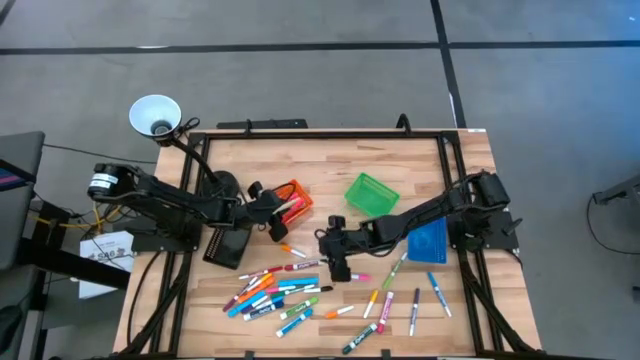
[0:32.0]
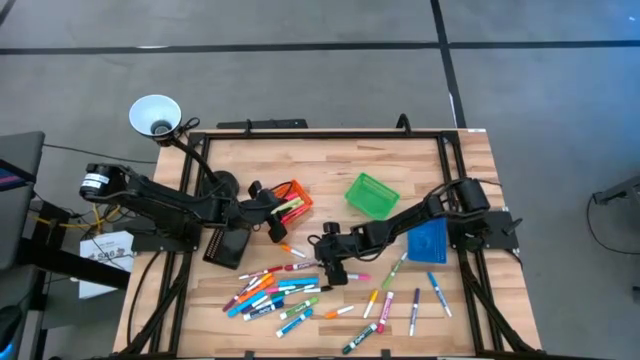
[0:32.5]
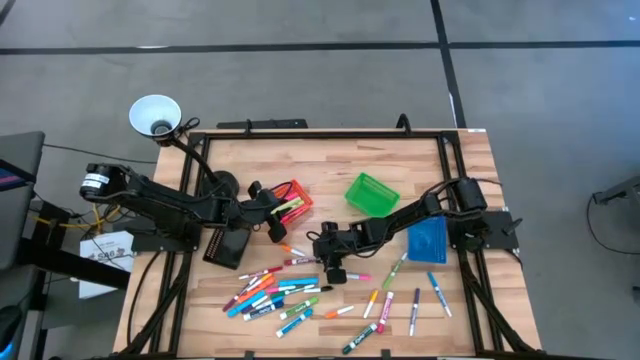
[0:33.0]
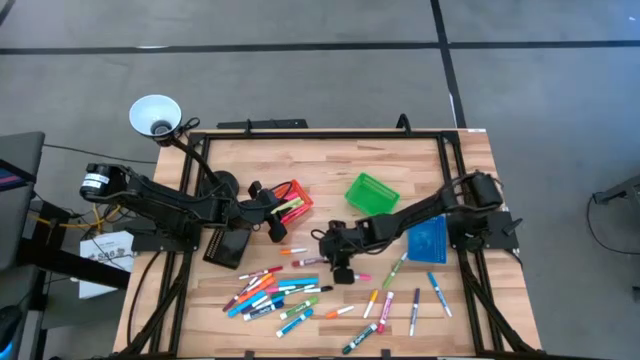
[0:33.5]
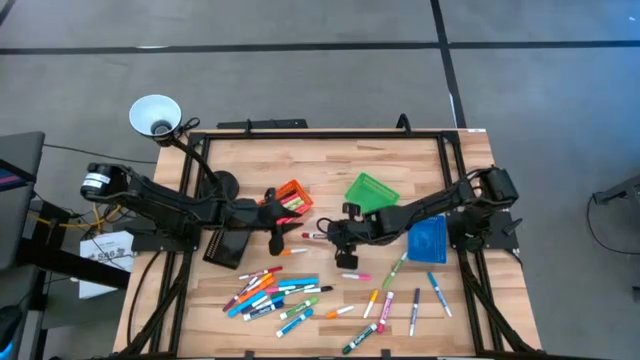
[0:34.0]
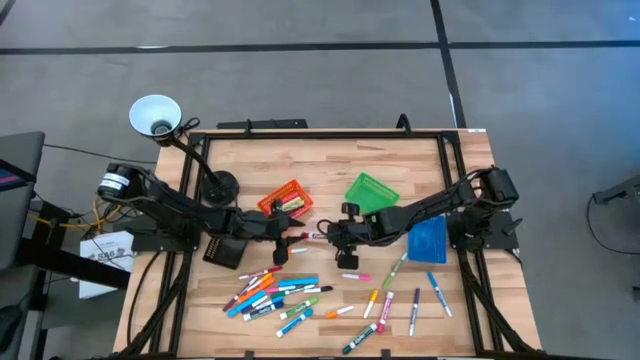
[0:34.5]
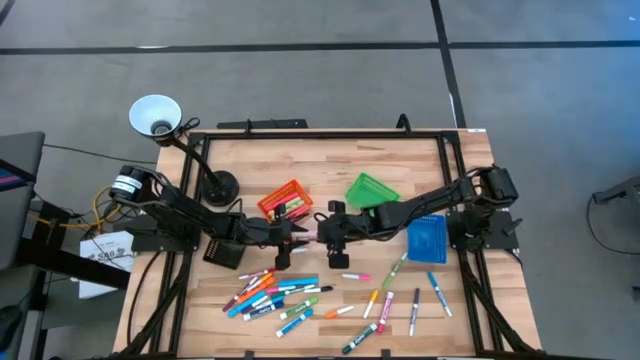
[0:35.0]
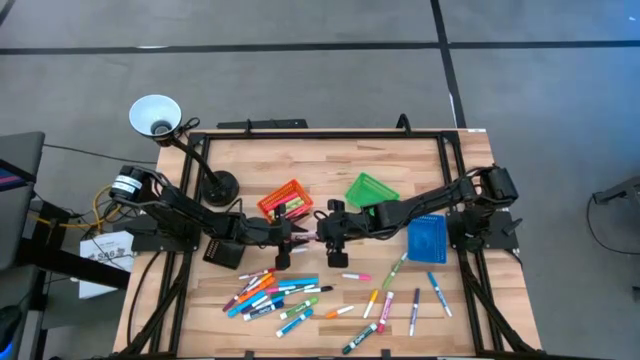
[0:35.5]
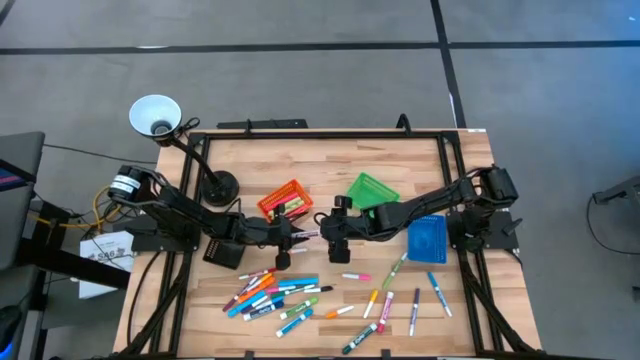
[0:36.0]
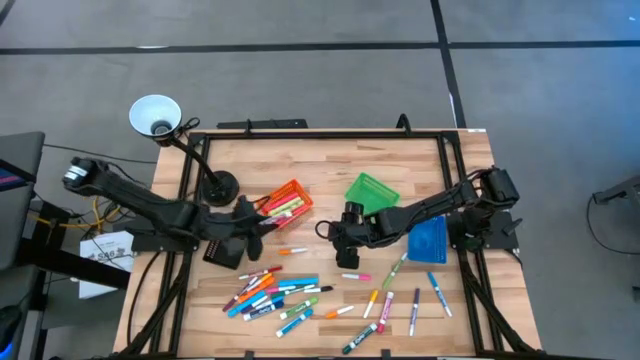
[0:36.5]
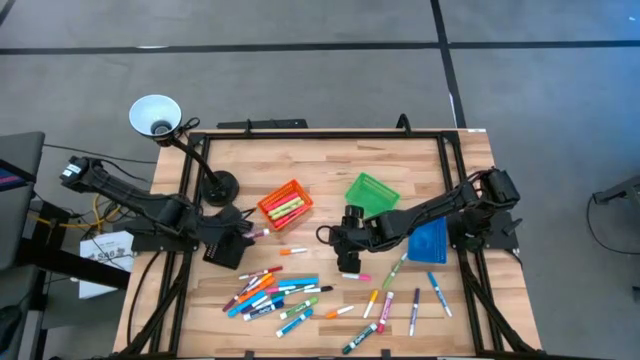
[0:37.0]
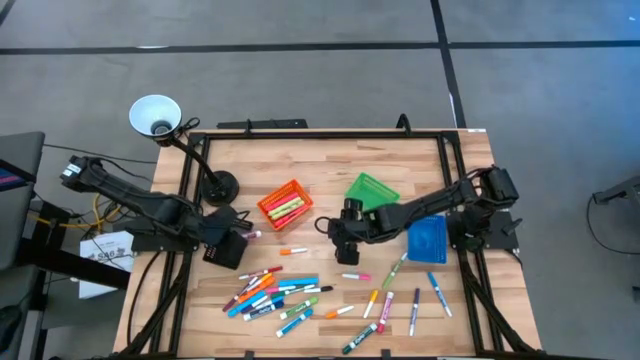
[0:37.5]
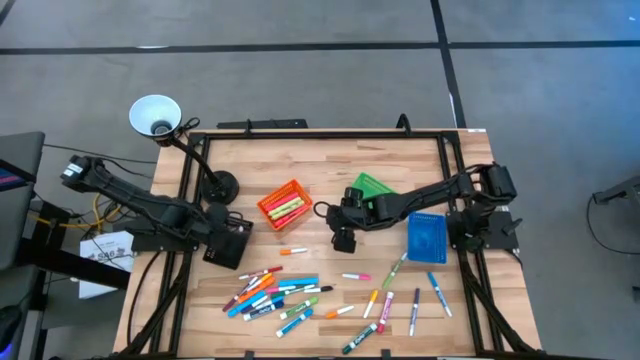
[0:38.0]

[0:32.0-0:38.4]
Task: Pick & Place Markers
Put the red marker pen into the black bin

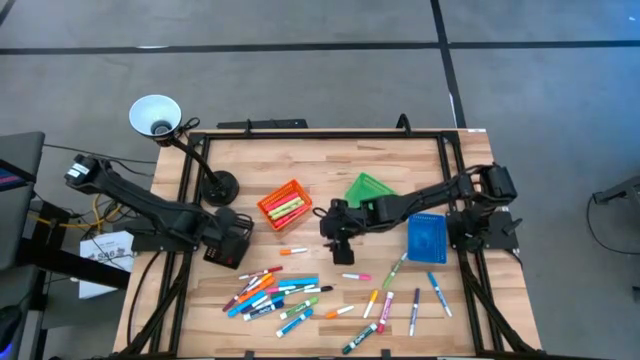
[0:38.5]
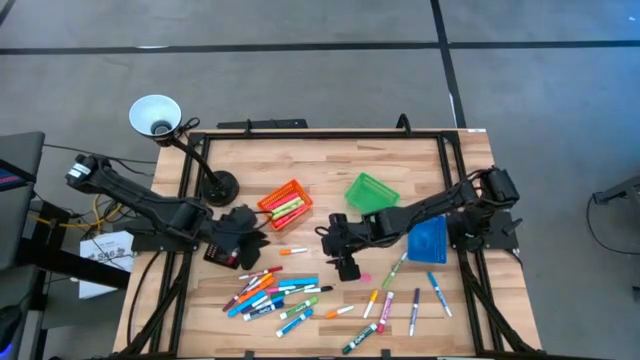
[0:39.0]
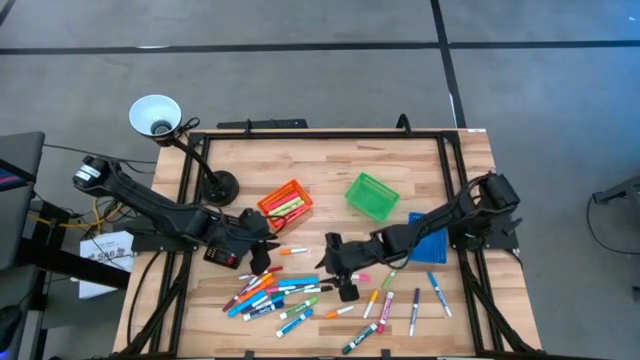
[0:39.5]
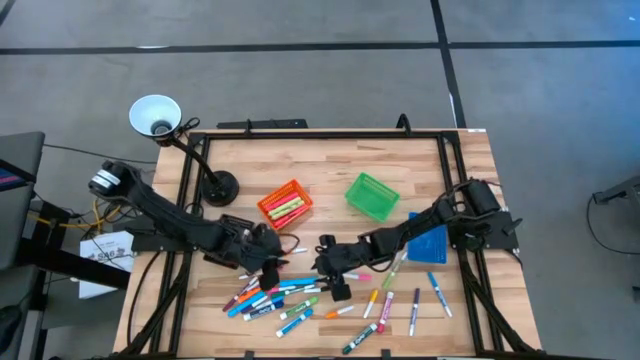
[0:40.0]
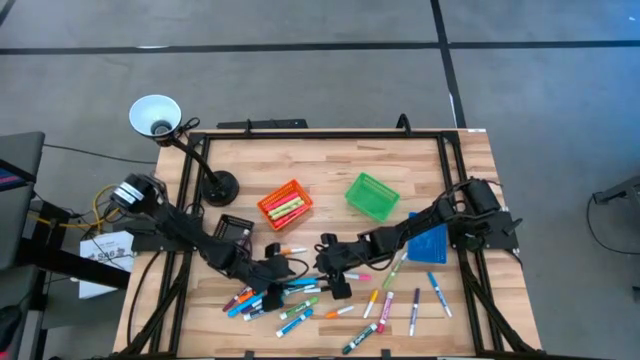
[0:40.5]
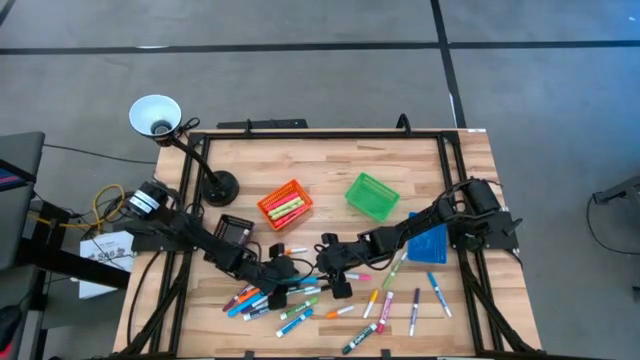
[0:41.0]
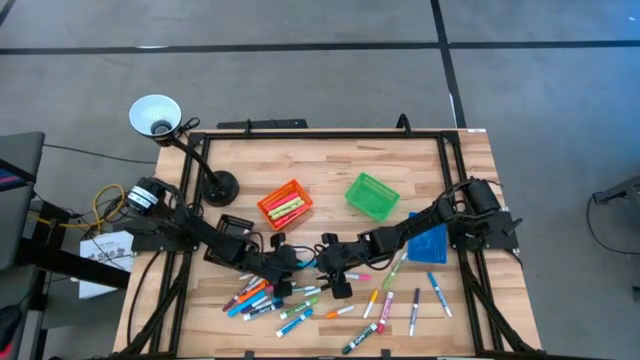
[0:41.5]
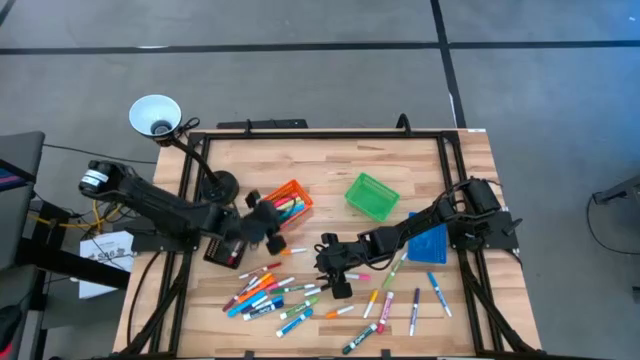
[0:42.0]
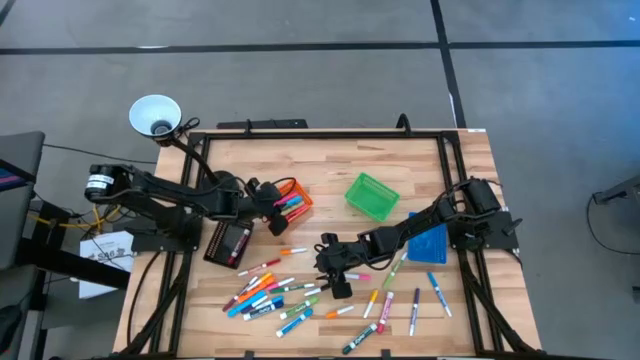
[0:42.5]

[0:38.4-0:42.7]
Put the right blue highlighter pen into the orange bin

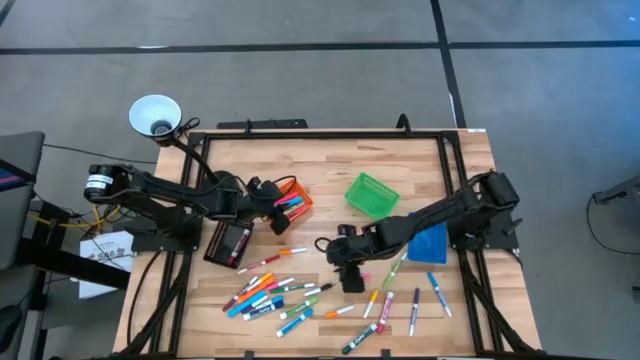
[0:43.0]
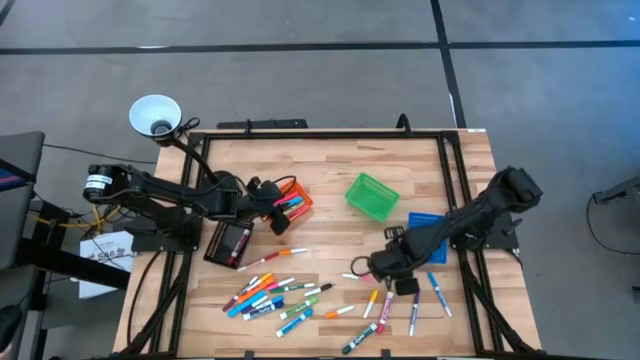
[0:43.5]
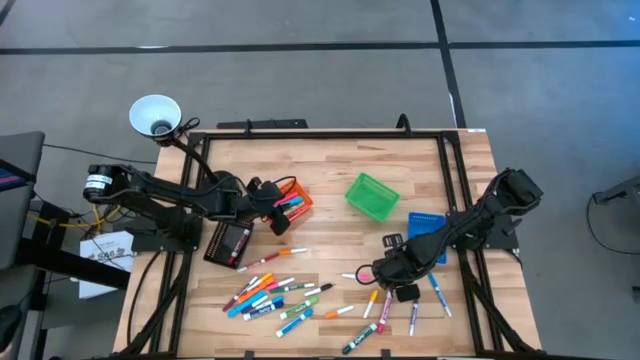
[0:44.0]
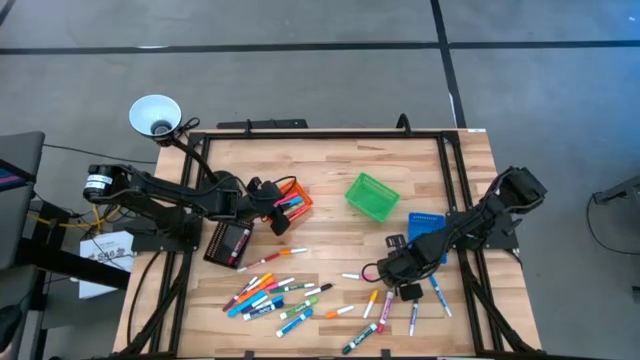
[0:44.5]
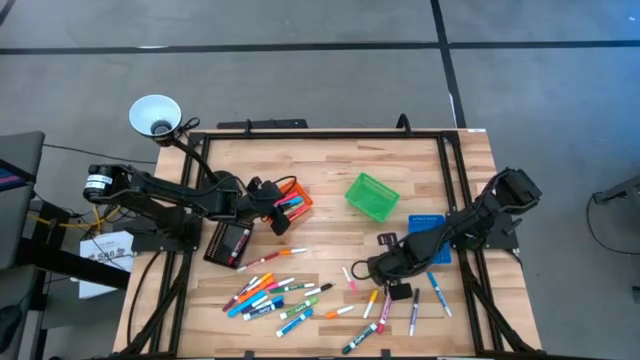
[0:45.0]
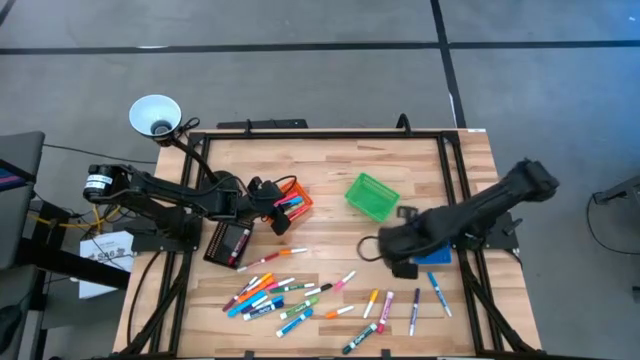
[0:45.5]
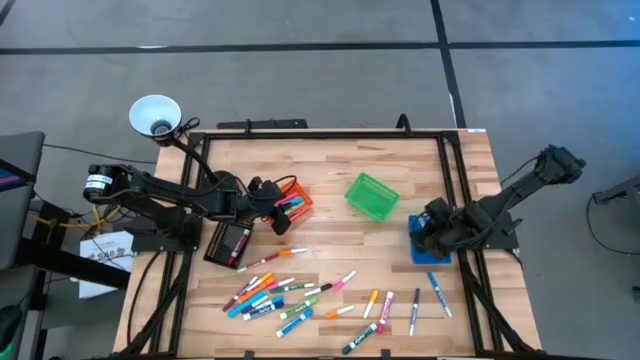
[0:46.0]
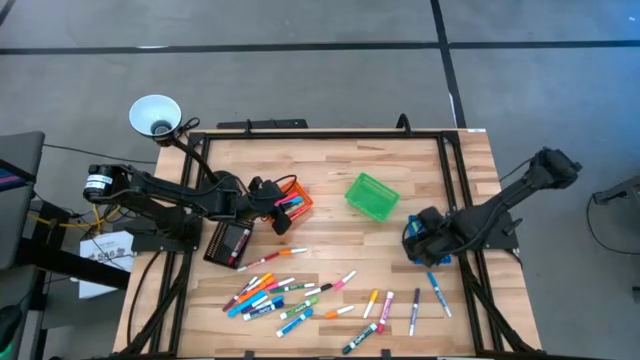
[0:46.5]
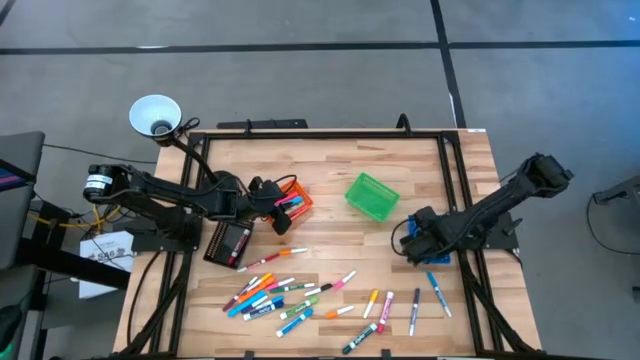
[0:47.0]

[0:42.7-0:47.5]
Put the green marker pen into the blue bin

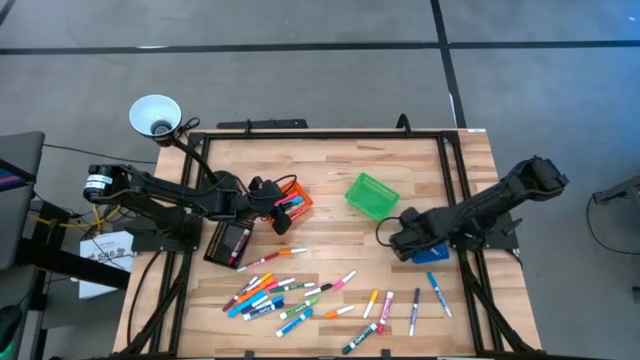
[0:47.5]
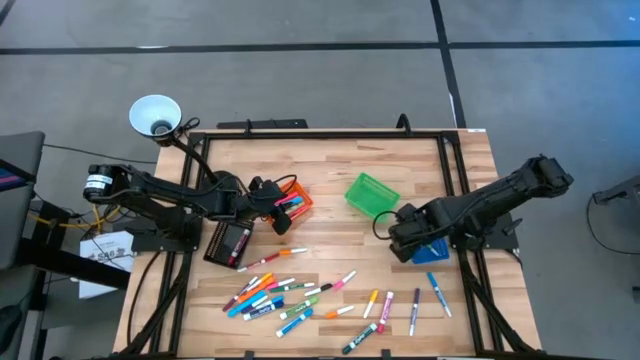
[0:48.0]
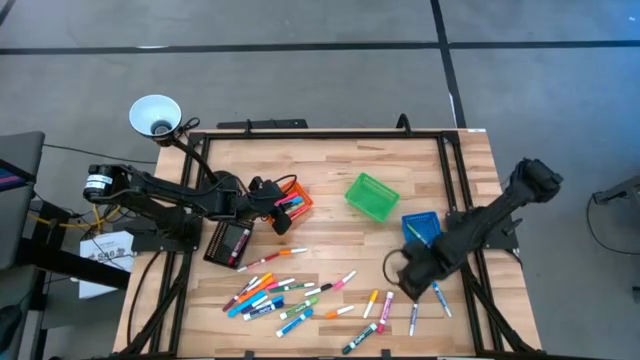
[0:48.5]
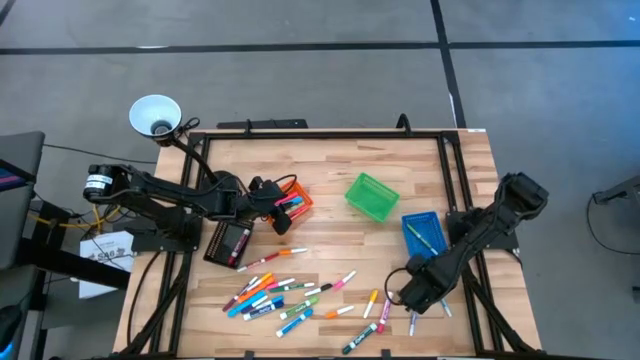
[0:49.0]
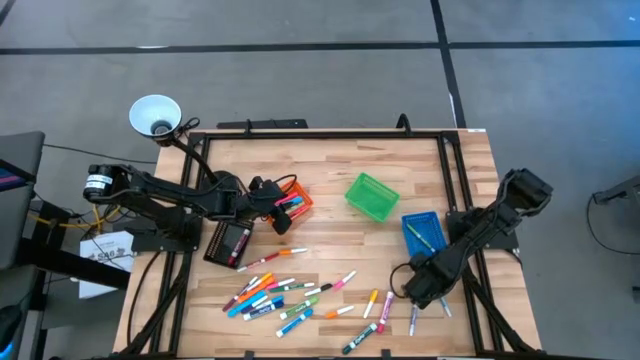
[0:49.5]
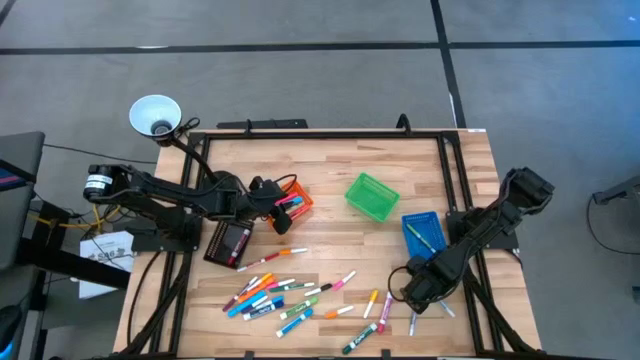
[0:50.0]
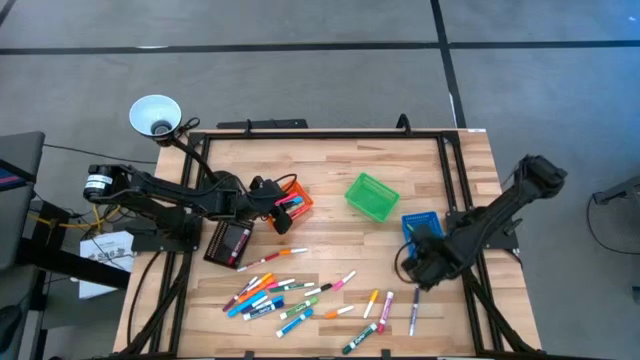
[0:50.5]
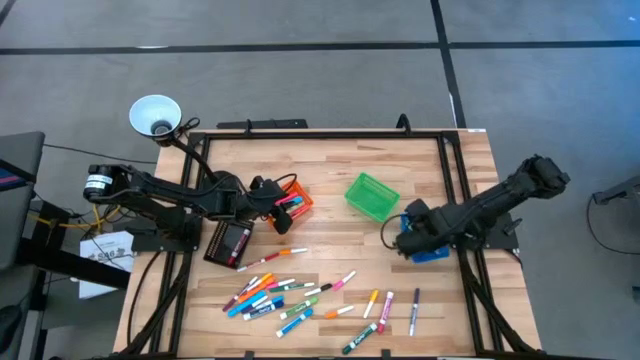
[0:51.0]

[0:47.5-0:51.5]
Put the light blue marker pen into the blue bin

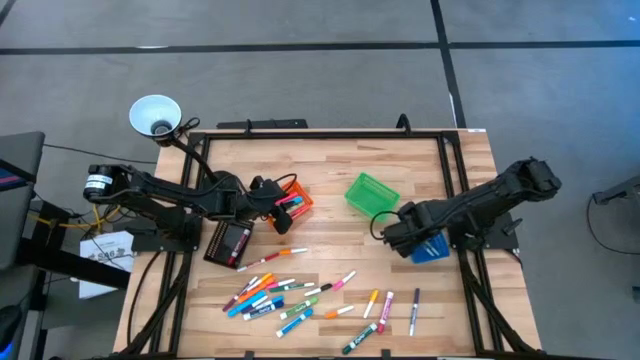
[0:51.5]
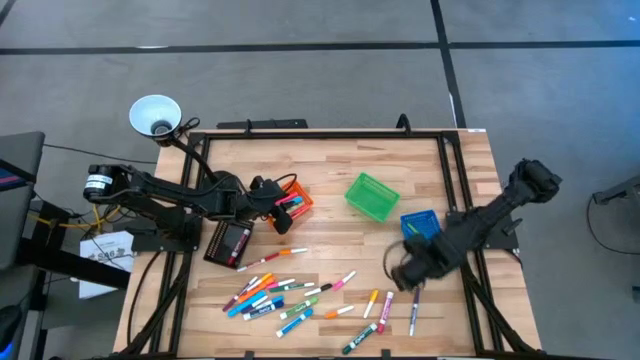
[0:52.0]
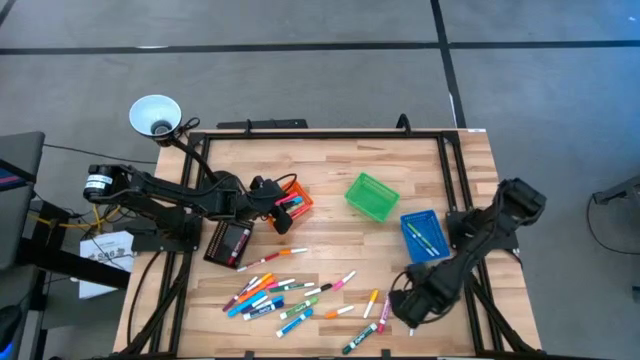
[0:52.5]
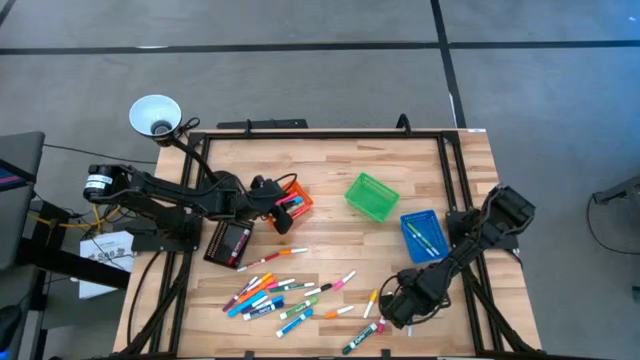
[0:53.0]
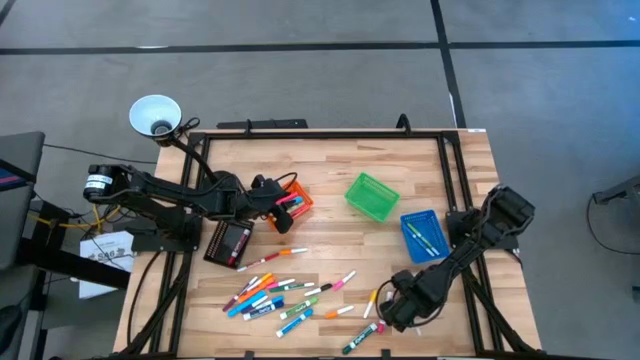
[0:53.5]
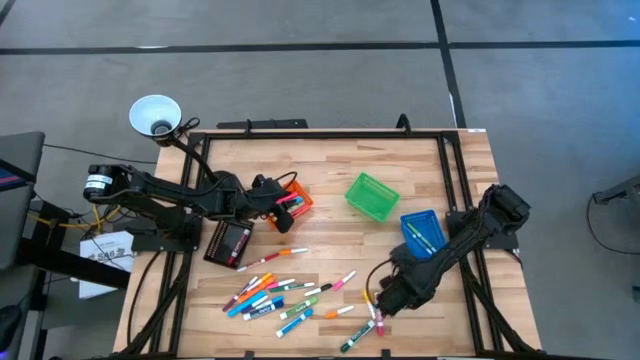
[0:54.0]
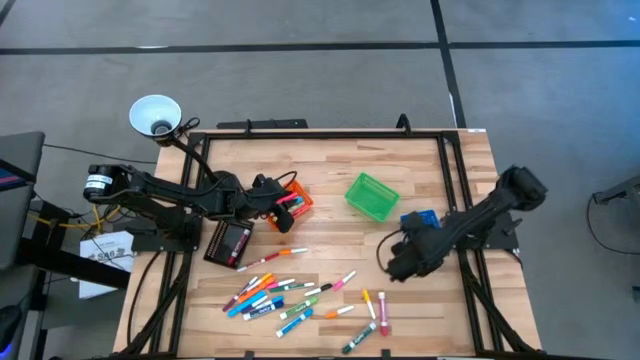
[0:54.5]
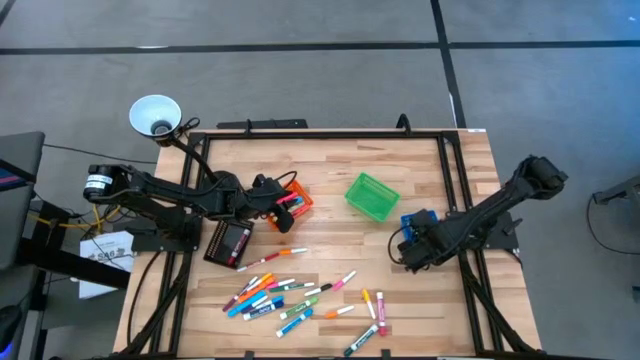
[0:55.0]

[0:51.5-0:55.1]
Put the dark blue marker pen into the blue bin
